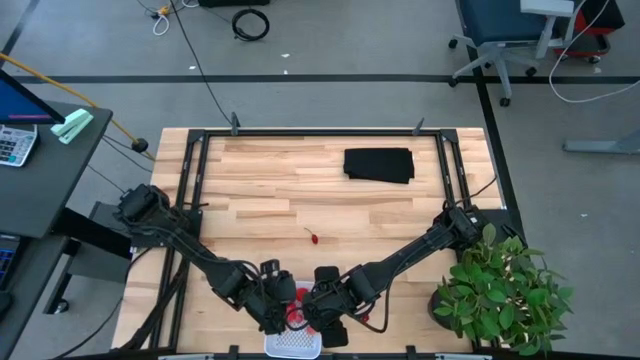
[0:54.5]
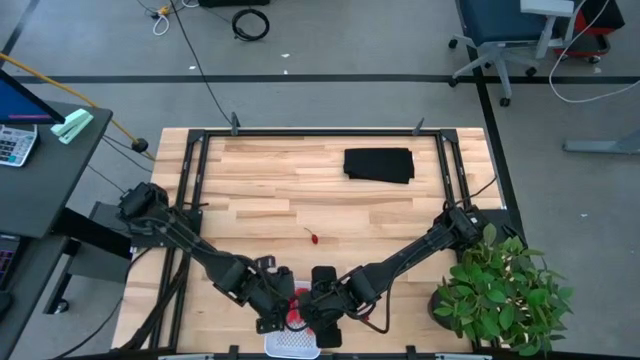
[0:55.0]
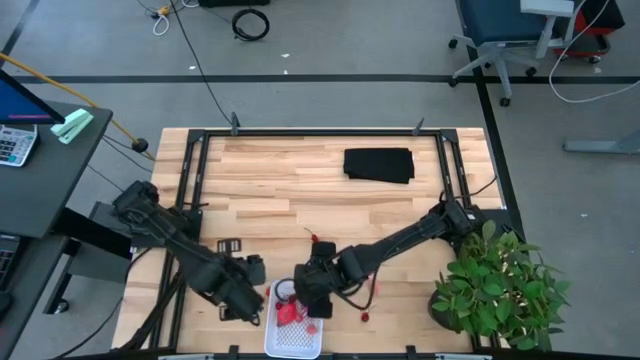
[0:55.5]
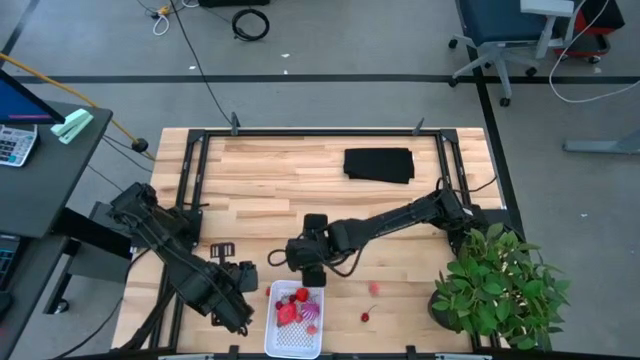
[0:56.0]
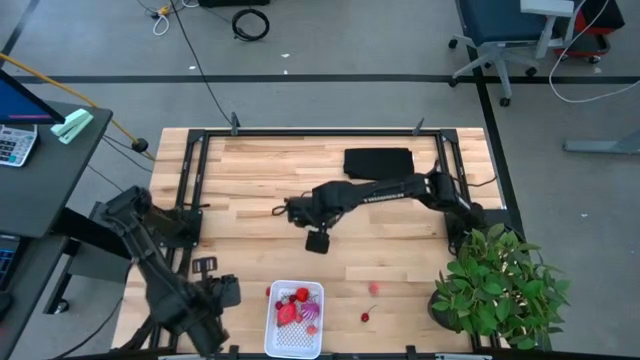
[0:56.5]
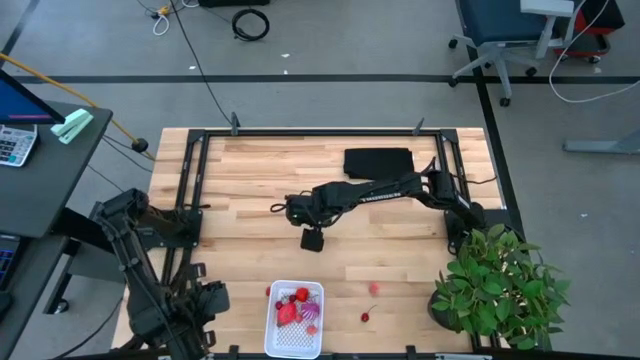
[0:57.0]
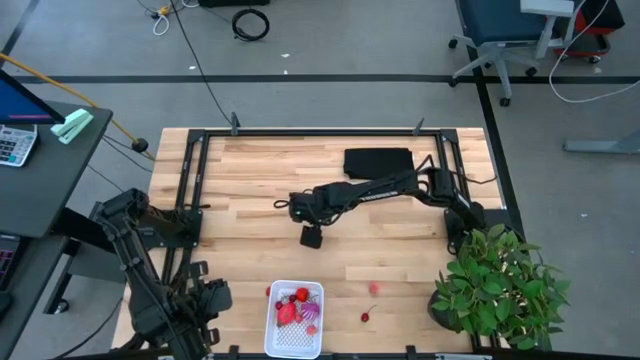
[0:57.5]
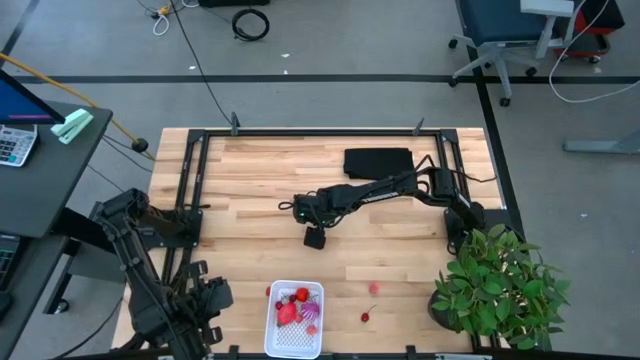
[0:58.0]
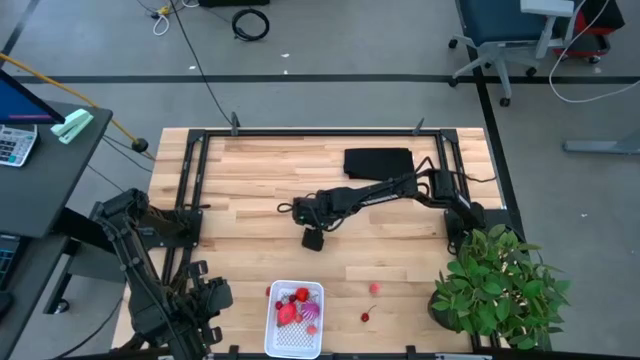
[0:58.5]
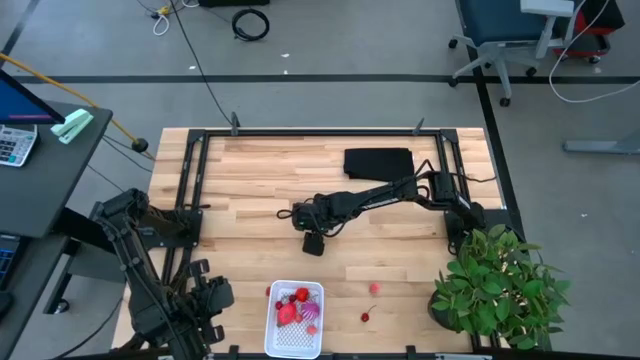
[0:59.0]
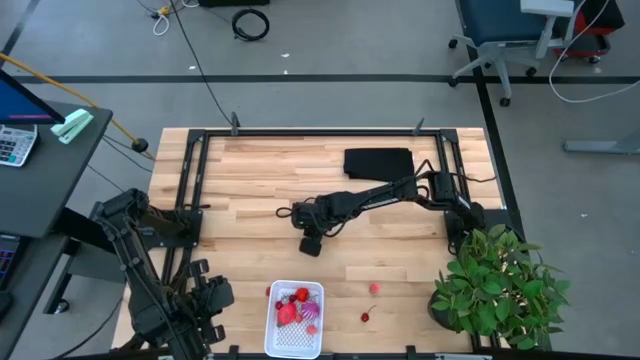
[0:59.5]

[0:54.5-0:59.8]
Task: Pick and placing Produce into tupperware
Put the top cherry into the white basket

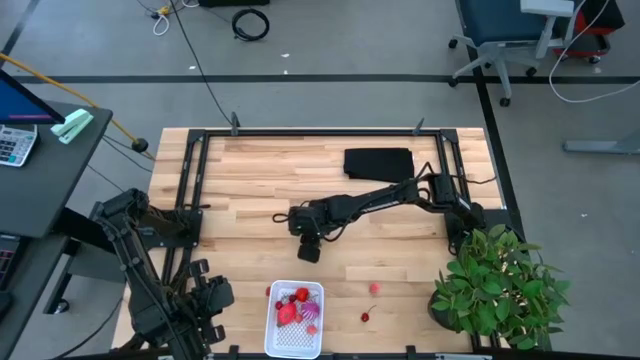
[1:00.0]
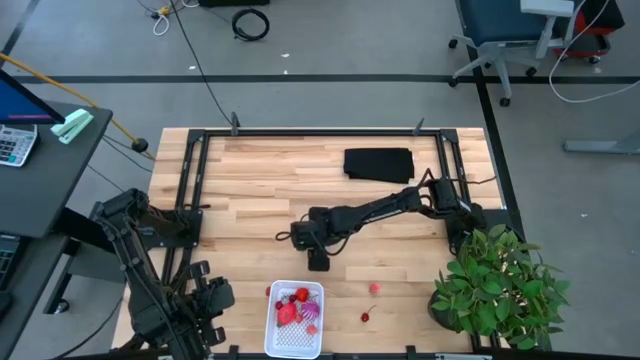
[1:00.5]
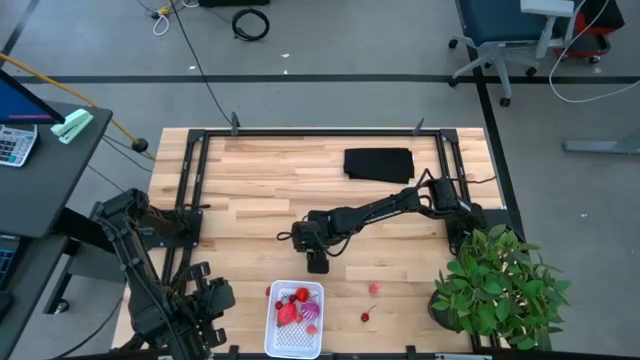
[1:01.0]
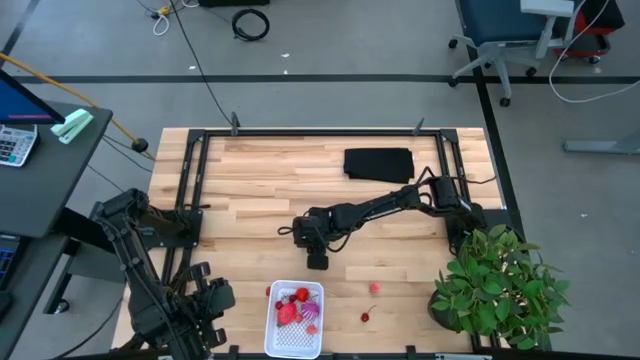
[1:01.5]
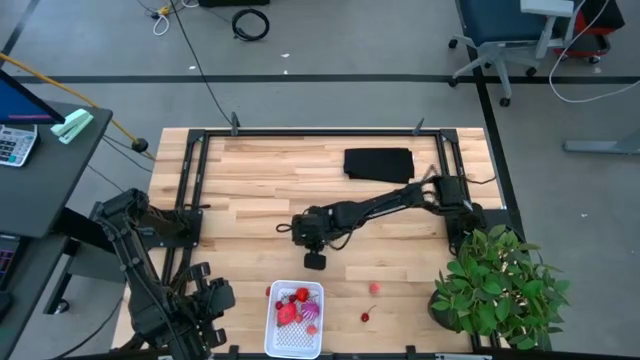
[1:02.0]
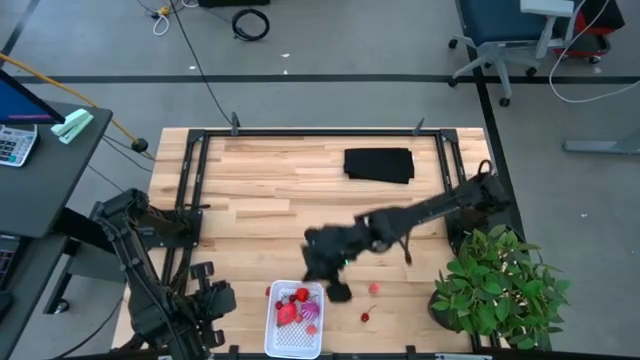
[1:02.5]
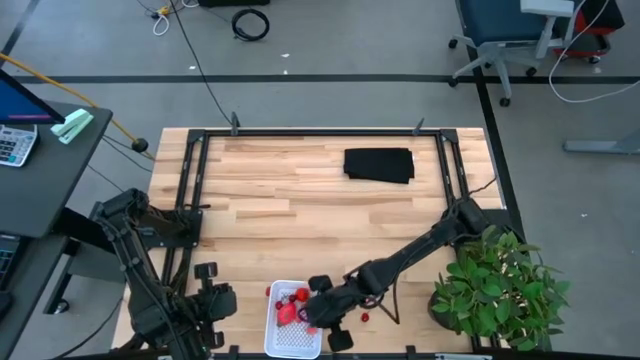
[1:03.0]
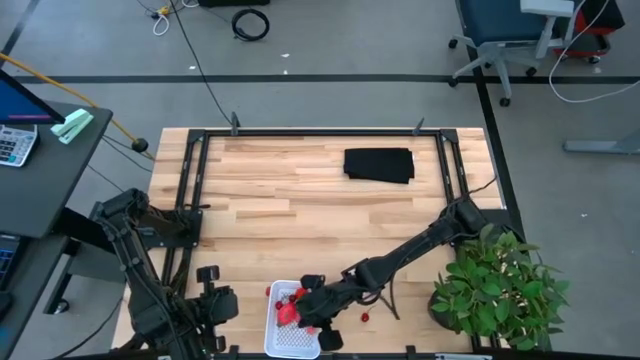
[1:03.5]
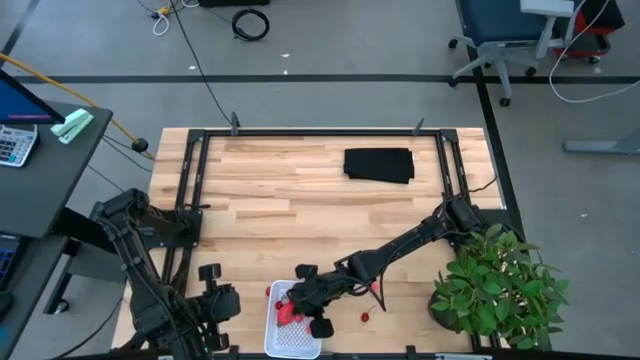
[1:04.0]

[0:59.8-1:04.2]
Put the top cherry into the white basket

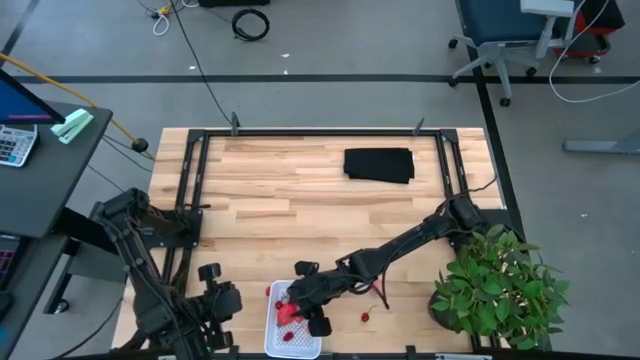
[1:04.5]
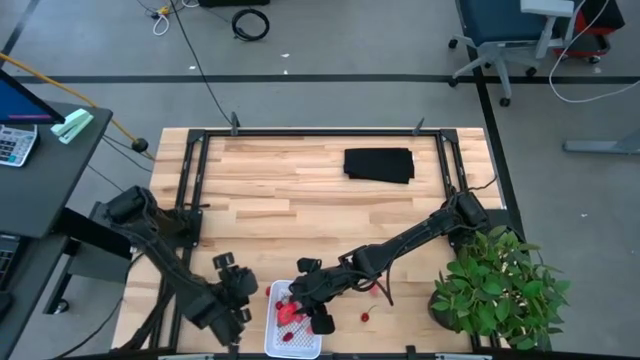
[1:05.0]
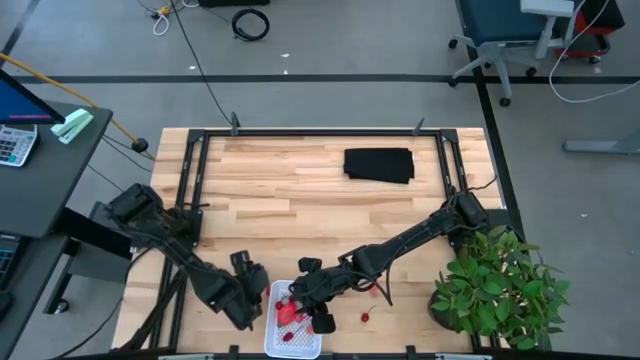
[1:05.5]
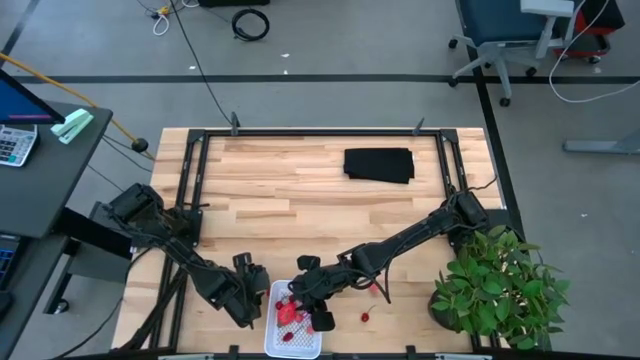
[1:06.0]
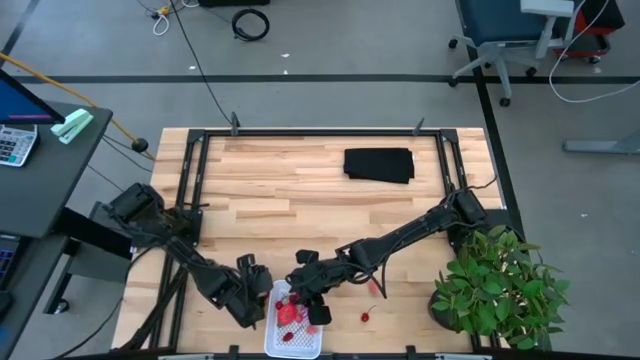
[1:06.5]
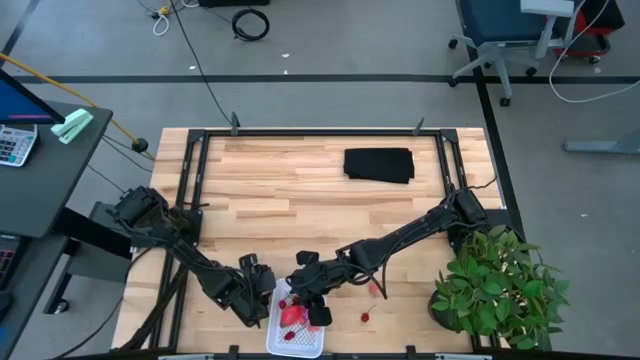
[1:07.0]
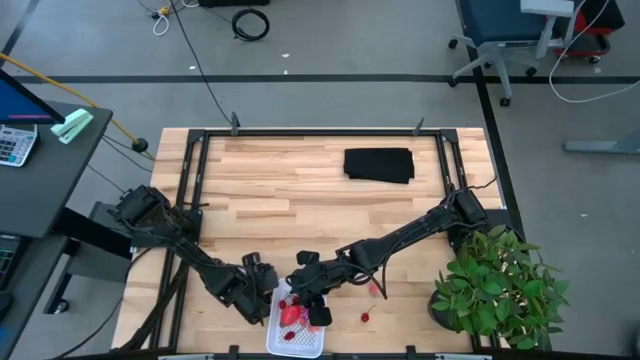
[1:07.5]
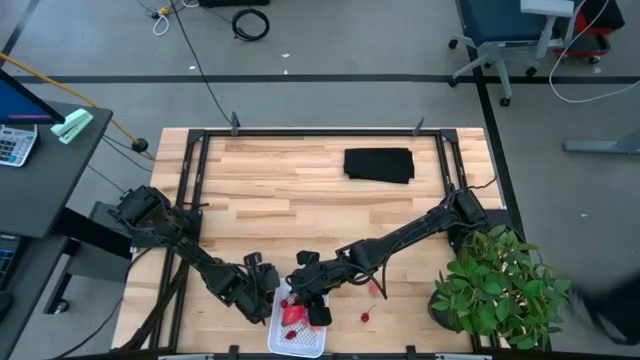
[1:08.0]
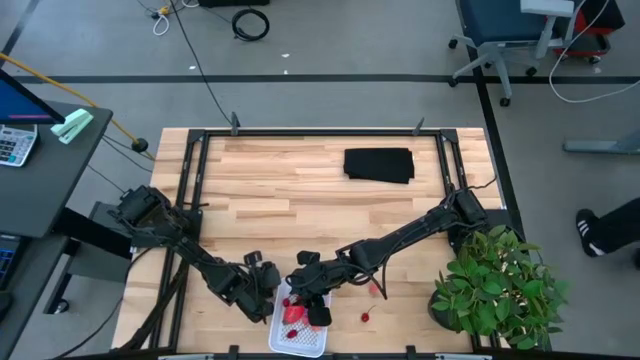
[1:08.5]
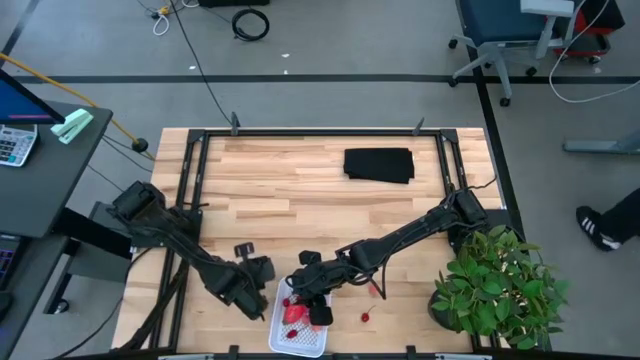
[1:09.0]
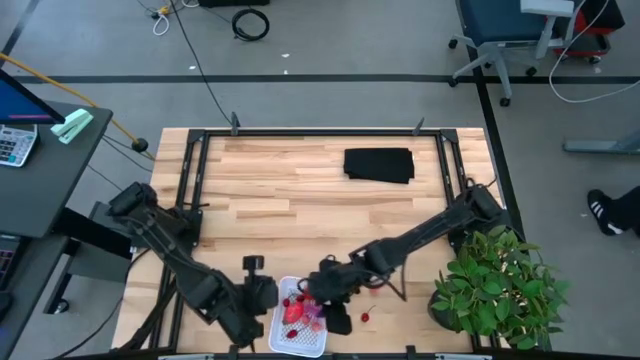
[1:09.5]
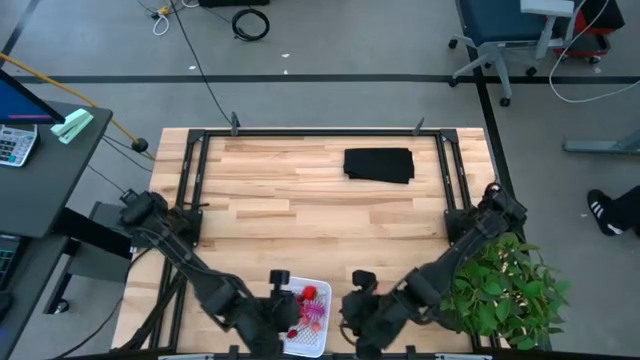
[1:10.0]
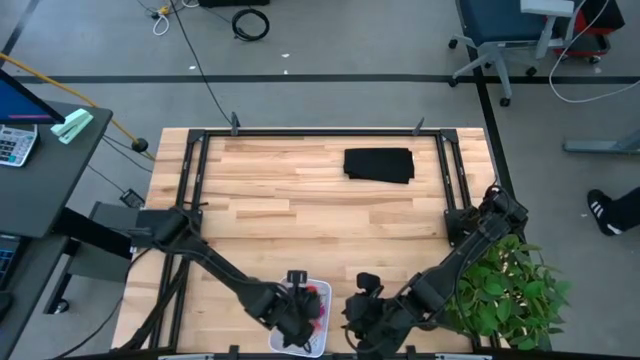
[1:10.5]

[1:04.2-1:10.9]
Put the raspberry into the white basket

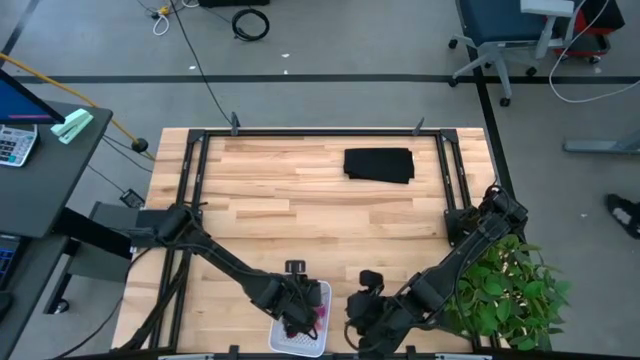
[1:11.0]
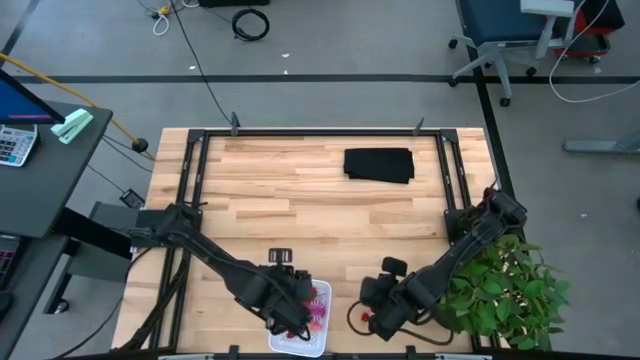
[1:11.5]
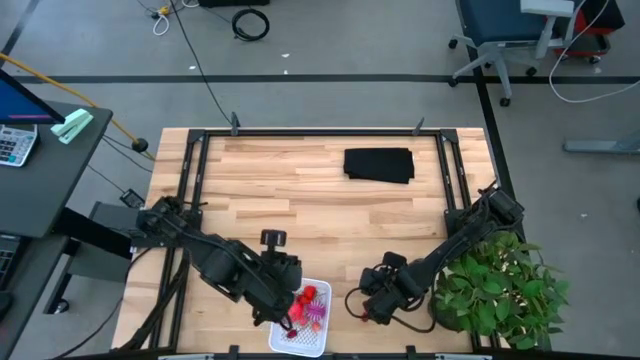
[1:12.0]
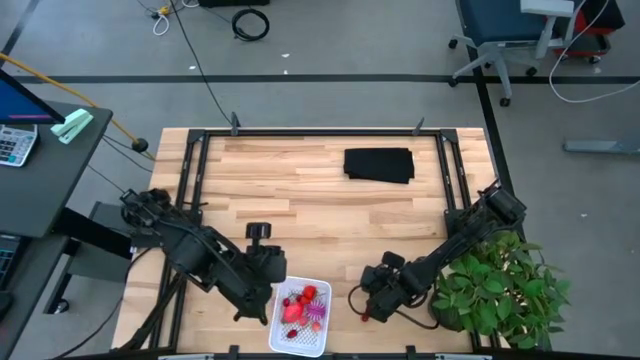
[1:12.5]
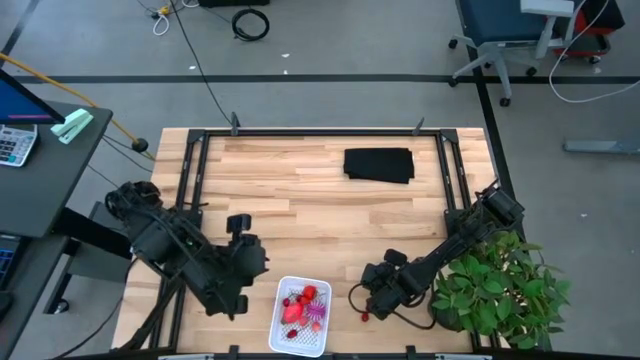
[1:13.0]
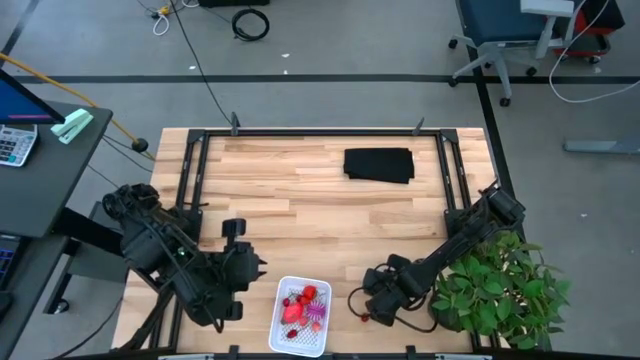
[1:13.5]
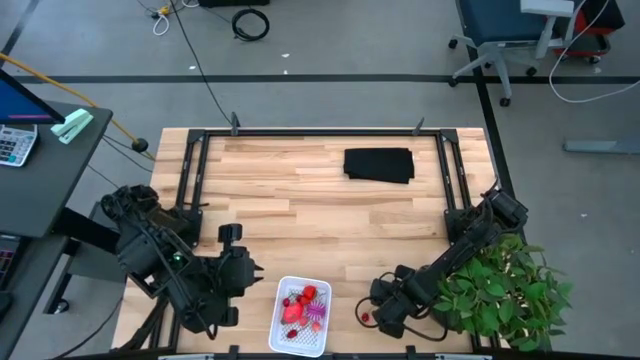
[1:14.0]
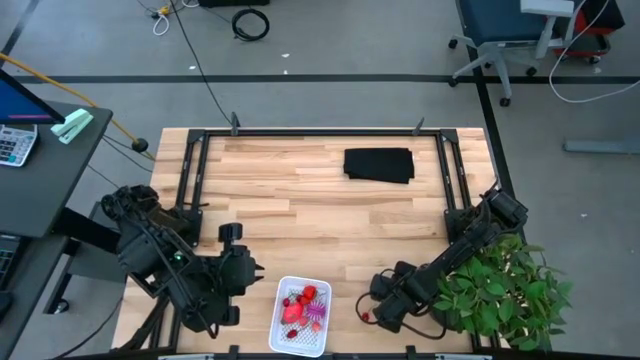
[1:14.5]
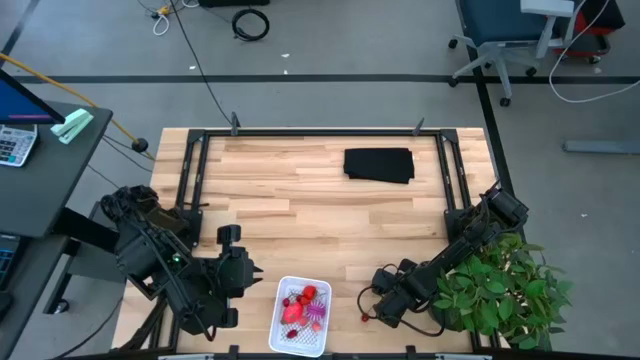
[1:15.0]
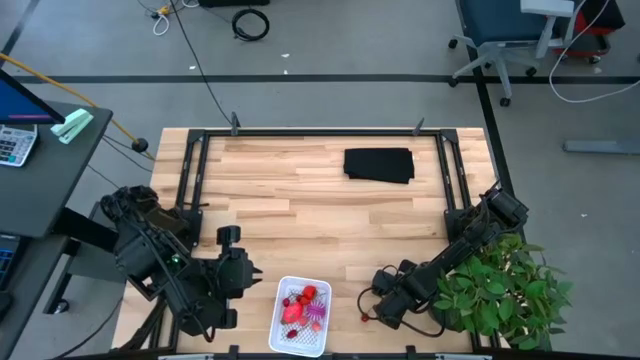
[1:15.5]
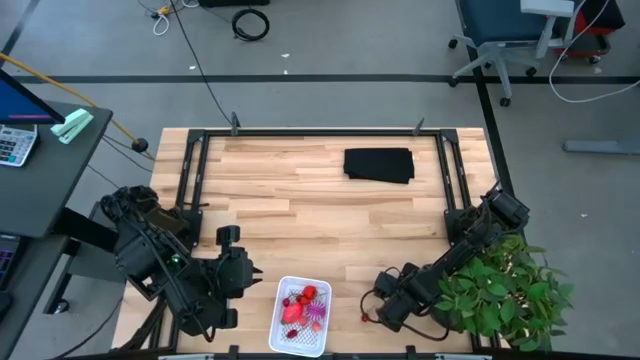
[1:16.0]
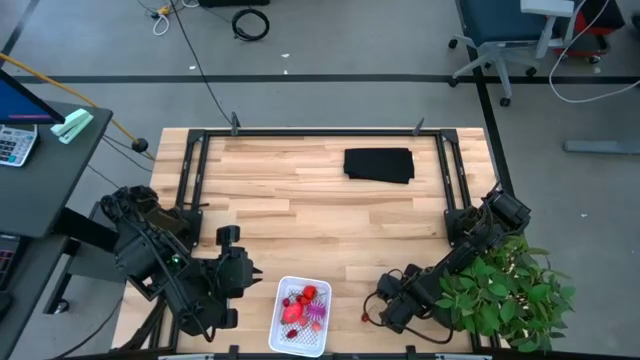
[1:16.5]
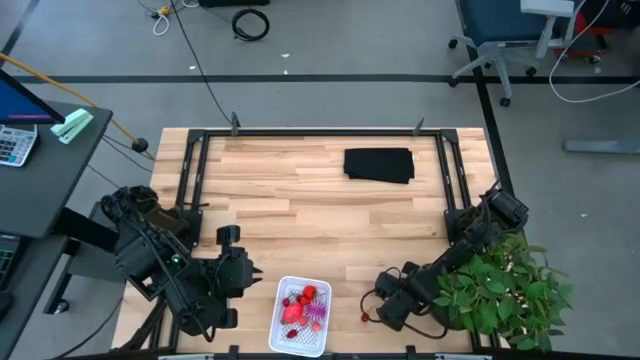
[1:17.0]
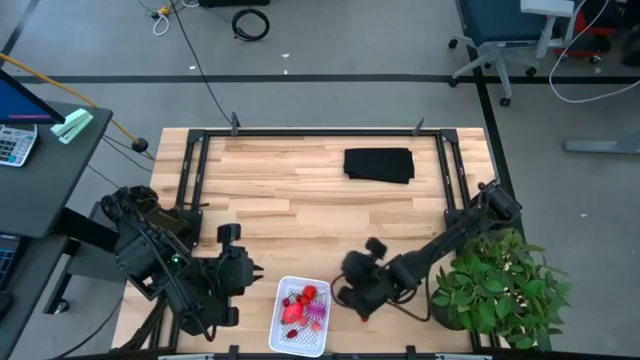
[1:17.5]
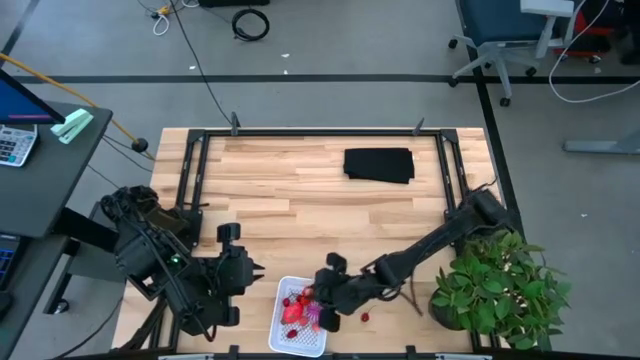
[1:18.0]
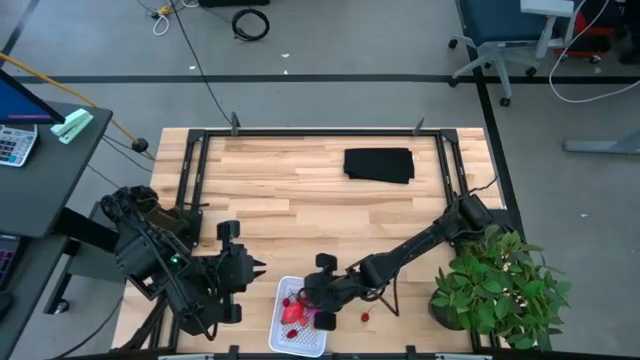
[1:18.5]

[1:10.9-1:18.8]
Put the lychee into the white basket
